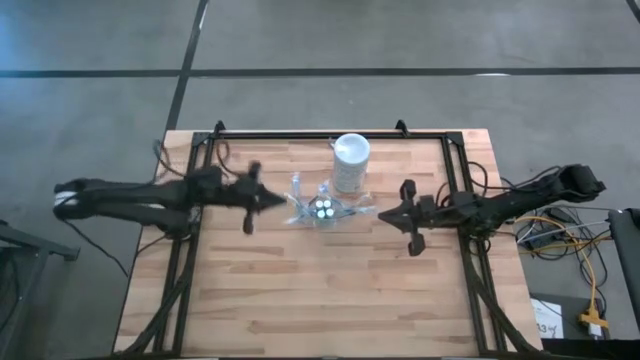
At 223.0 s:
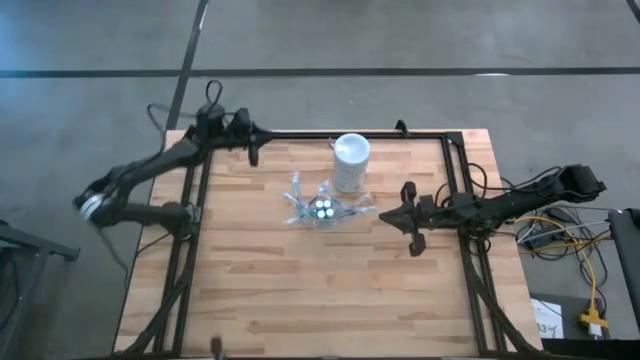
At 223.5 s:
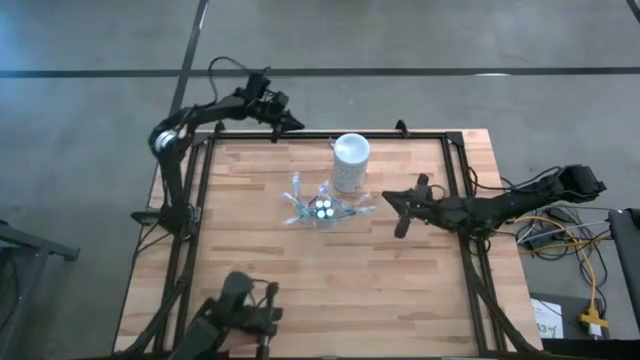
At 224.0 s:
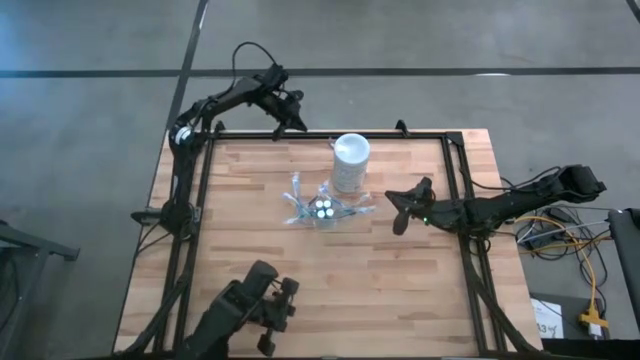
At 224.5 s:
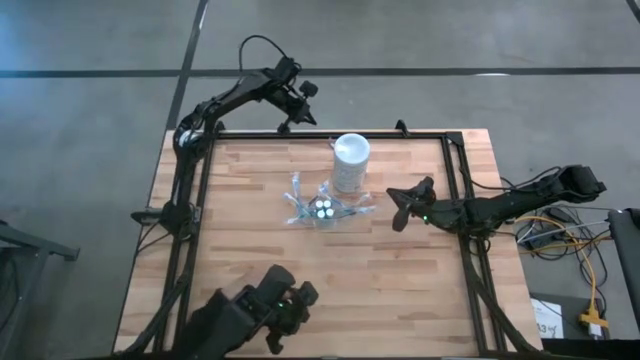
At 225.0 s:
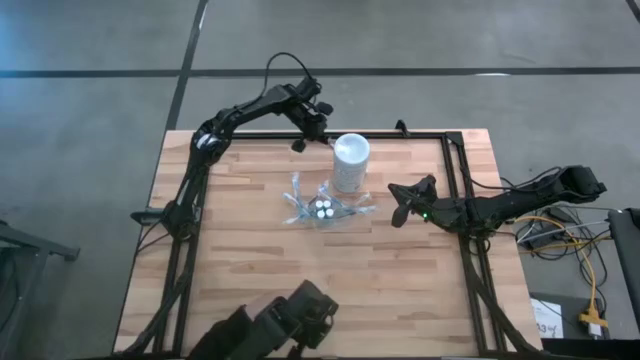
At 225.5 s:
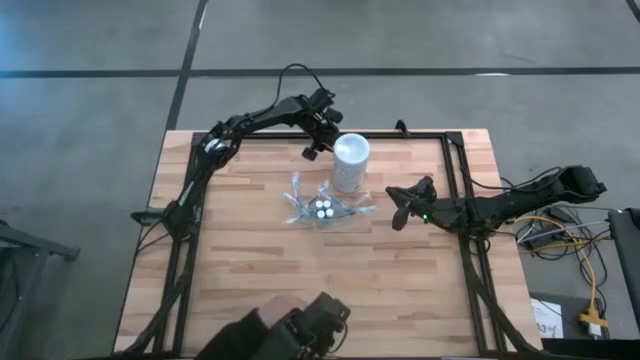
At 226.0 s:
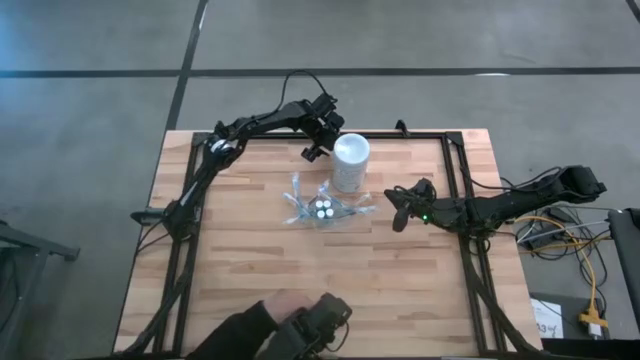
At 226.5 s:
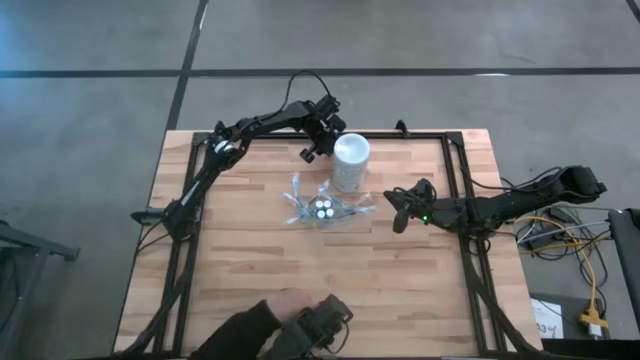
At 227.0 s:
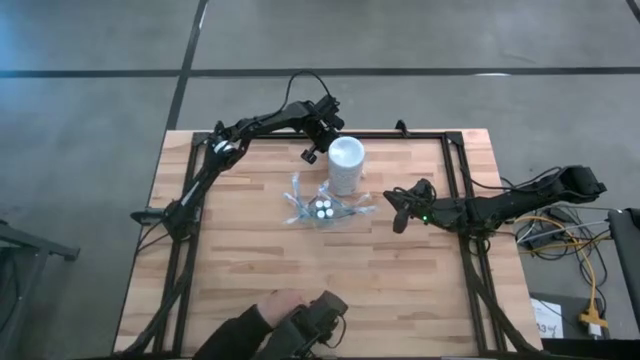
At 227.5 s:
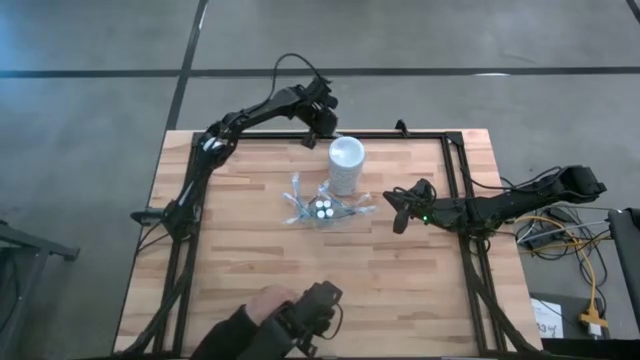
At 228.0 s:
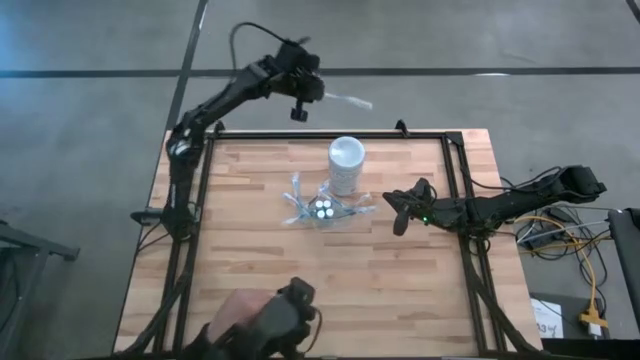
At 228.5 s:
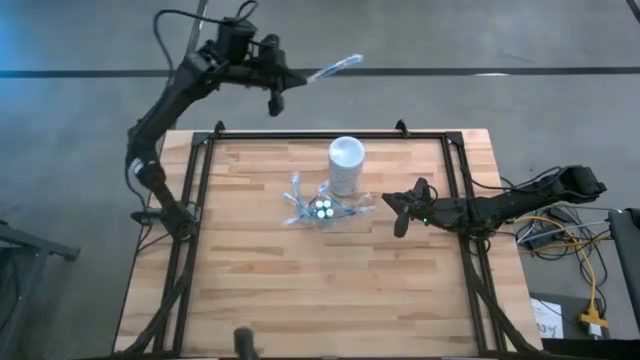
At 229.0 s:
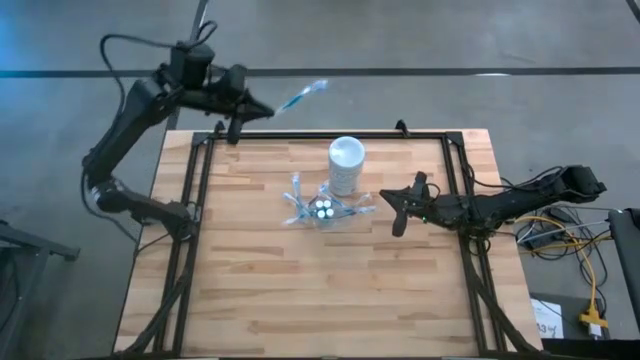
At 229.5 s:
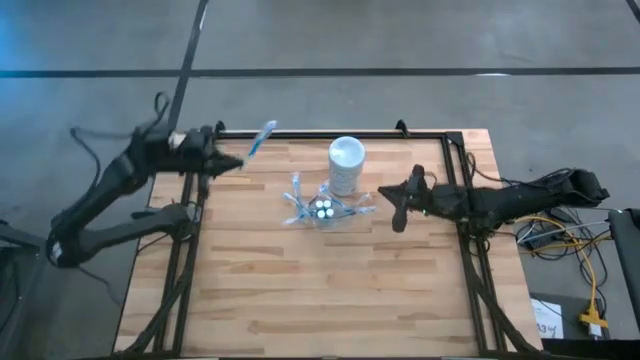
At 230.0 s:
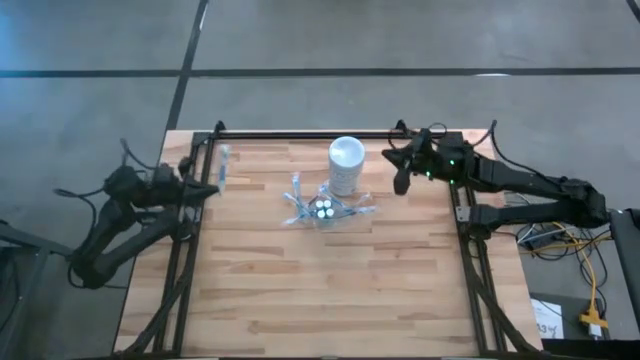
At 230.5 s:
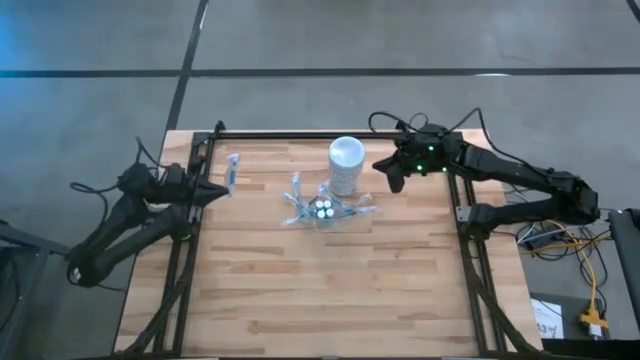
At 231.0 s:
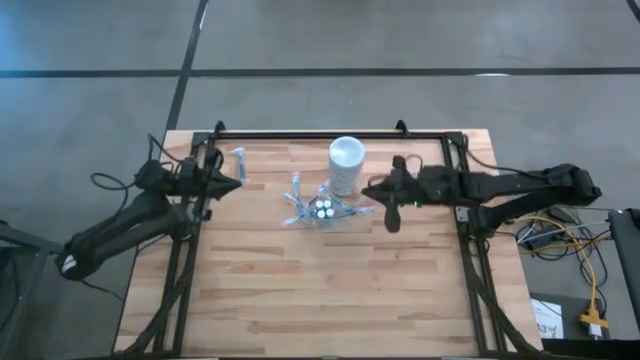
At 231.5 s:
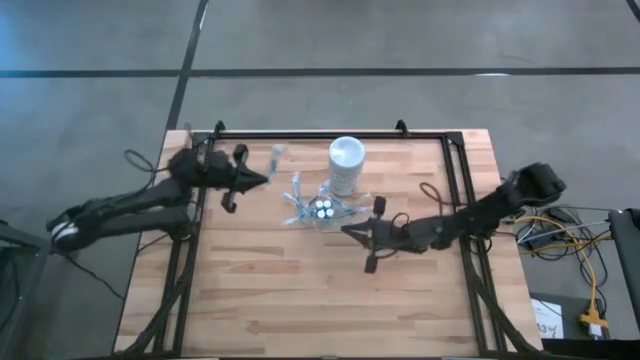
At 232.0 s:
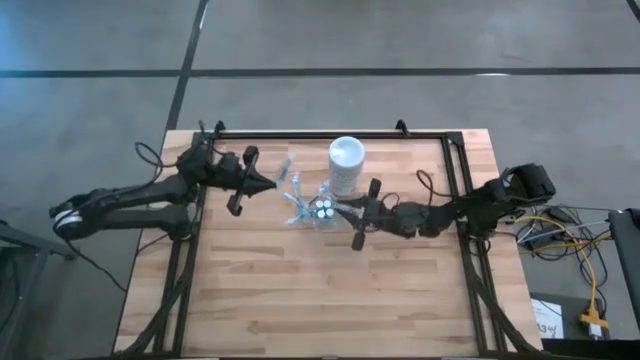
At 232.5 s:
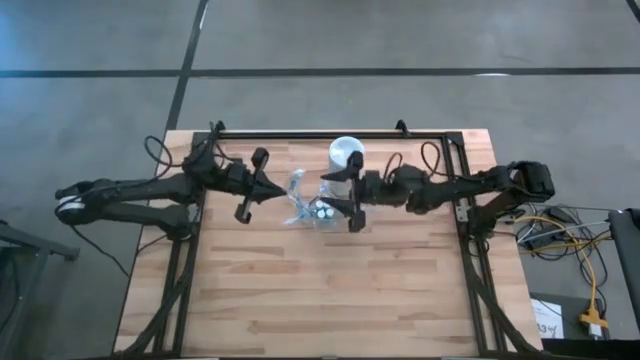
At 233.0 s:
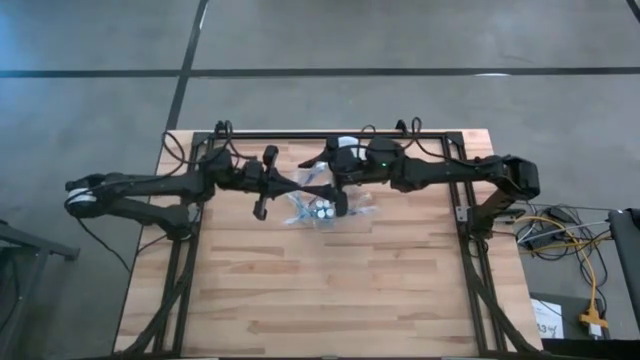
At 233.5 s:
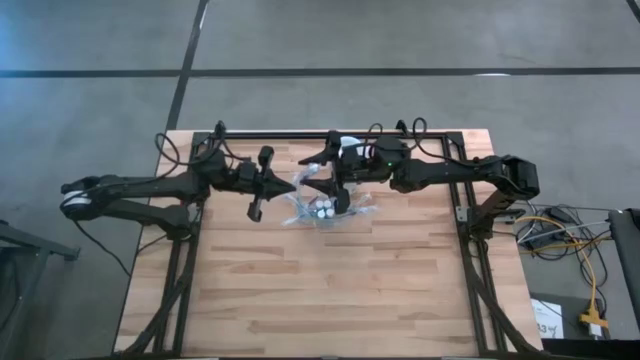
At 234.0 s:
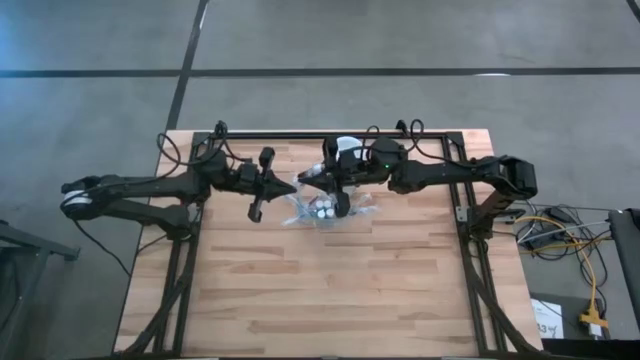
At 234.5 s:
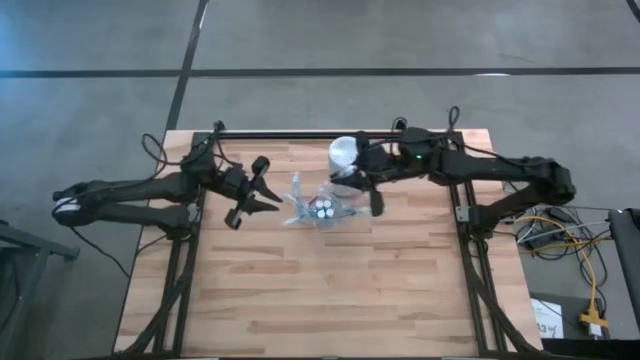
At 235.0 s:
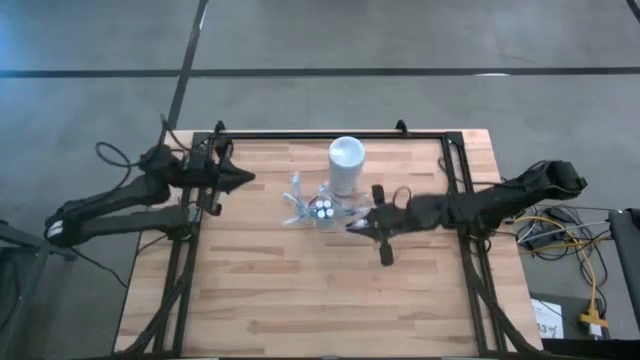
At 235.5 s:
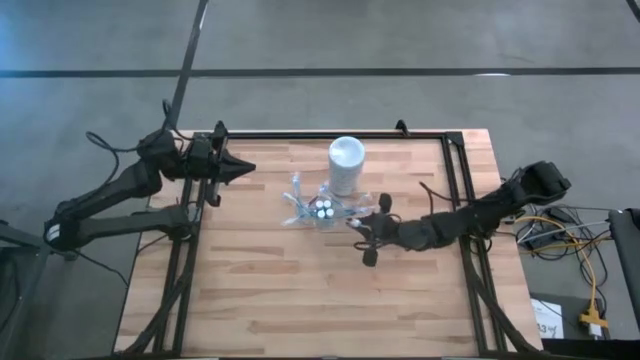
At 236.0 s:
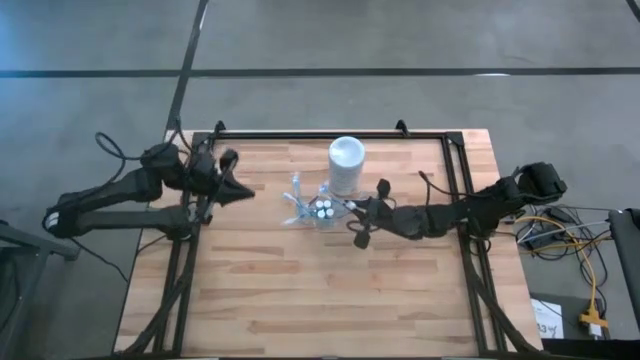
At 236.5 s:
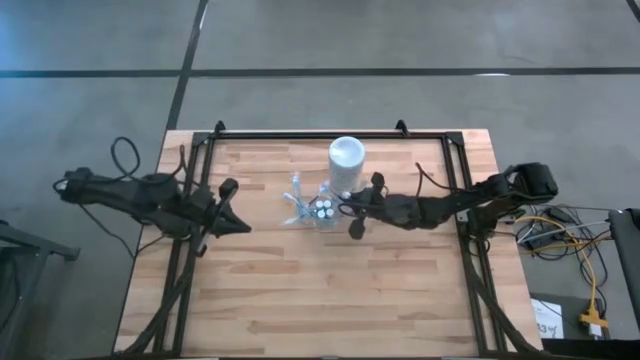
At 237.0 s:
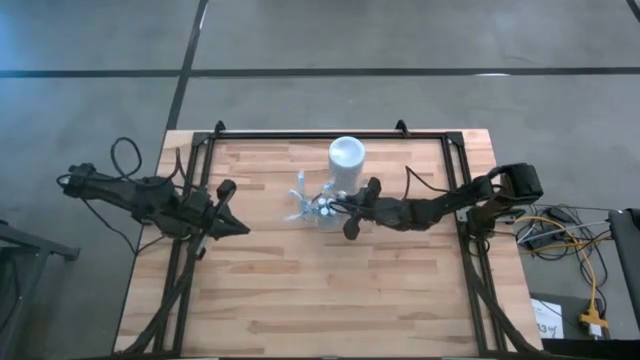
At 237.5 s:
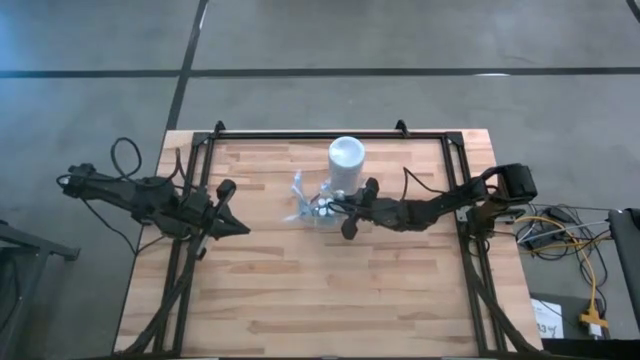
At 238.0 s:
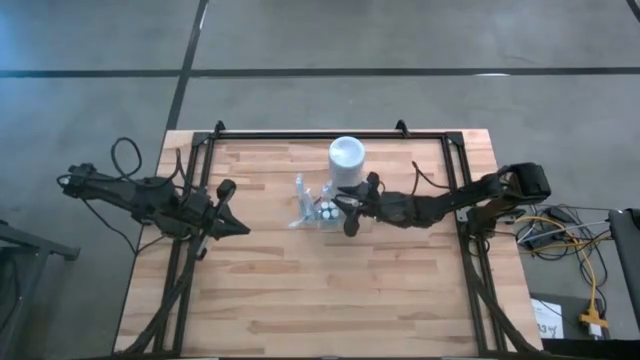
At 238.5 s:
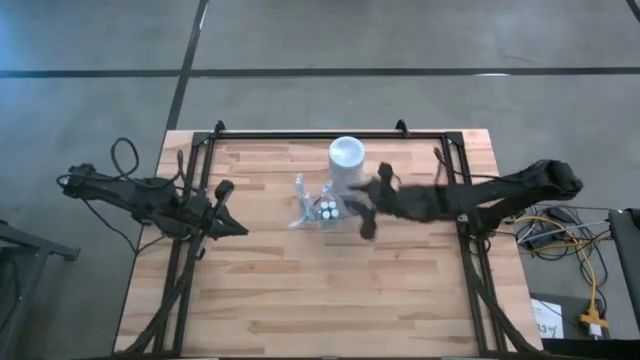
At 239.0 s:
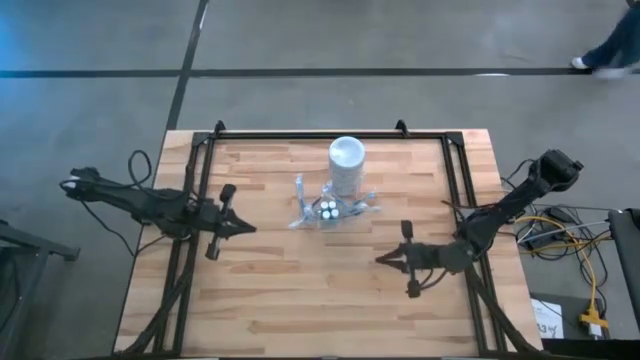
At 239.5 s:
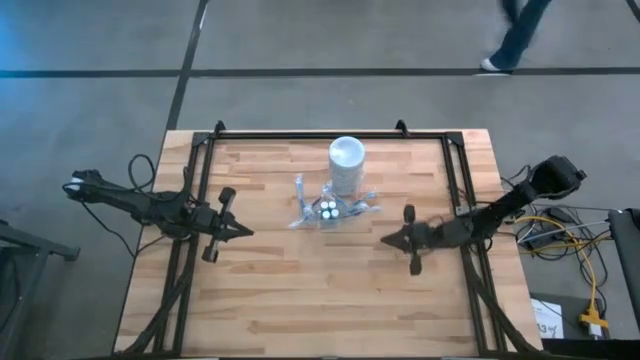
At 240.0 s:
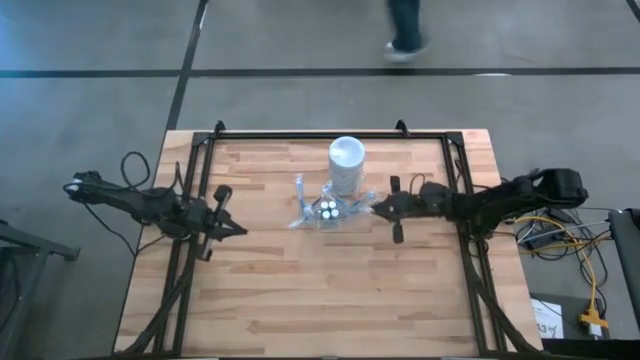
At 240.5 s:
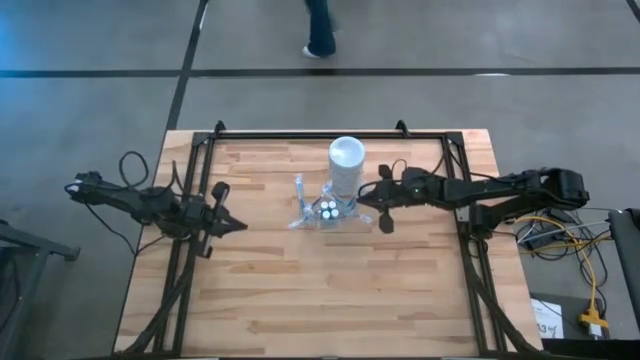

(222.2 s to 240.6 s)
Task: Pick & Place toothbrushing station
Put the blue toothbrush into the transparent organizer
